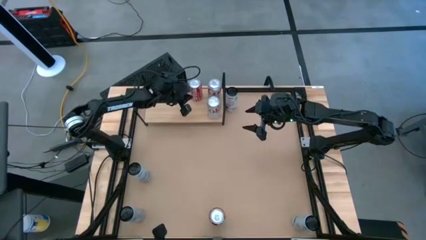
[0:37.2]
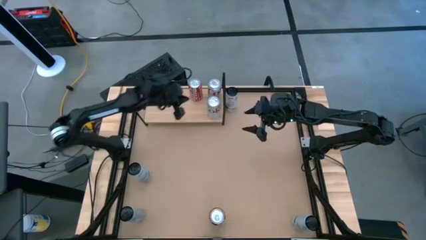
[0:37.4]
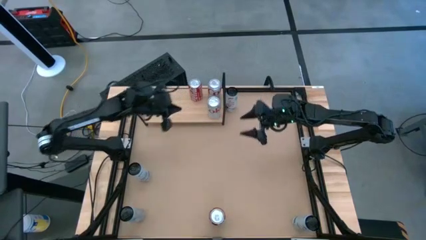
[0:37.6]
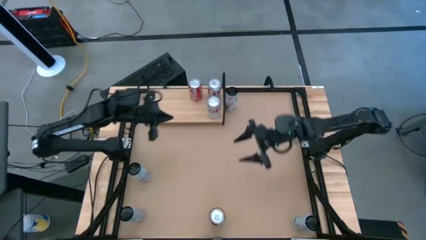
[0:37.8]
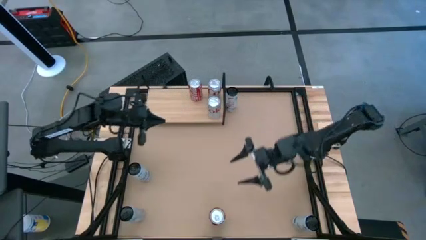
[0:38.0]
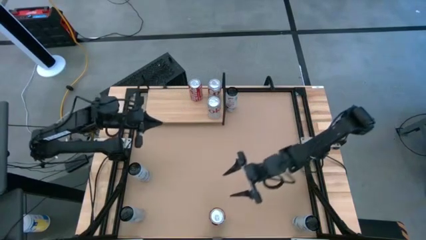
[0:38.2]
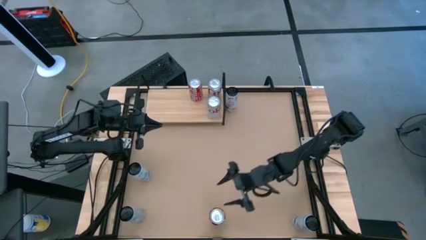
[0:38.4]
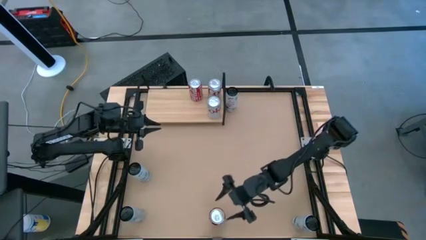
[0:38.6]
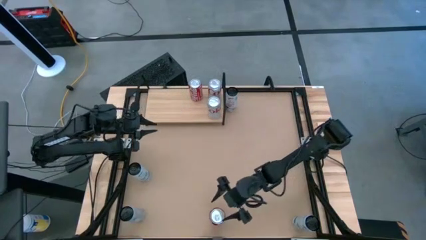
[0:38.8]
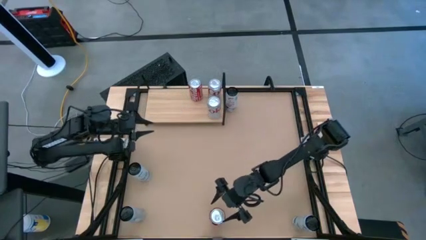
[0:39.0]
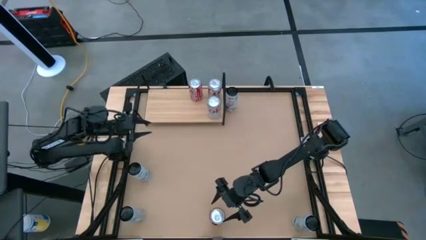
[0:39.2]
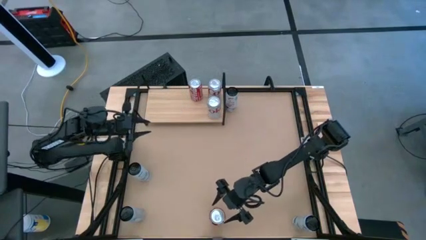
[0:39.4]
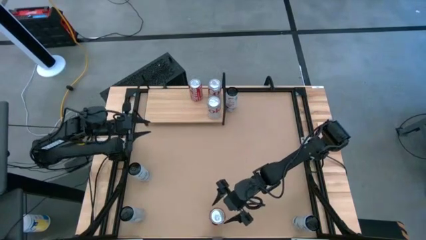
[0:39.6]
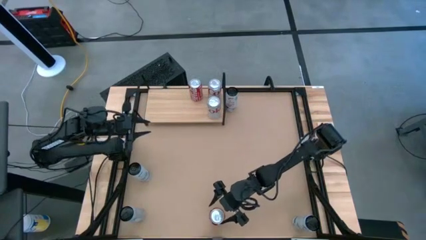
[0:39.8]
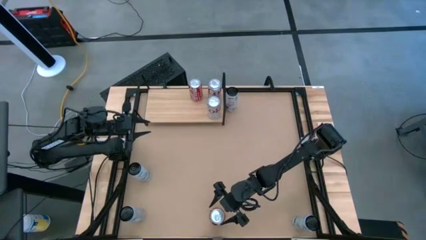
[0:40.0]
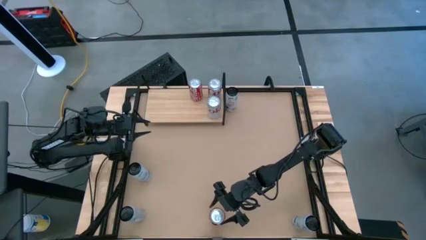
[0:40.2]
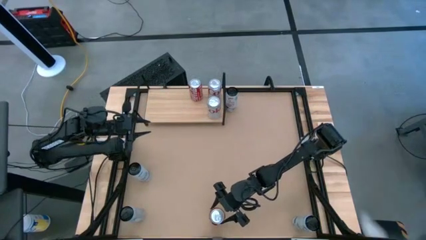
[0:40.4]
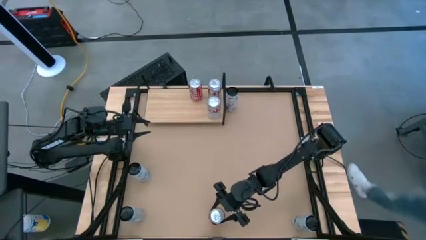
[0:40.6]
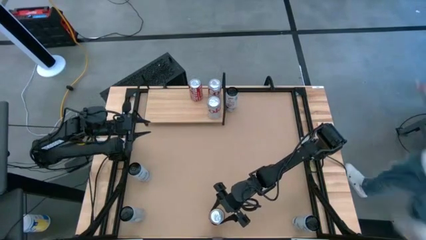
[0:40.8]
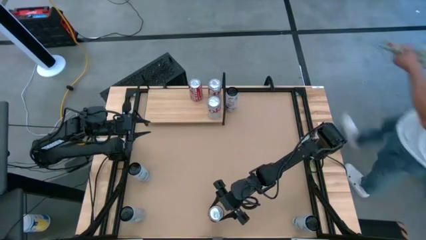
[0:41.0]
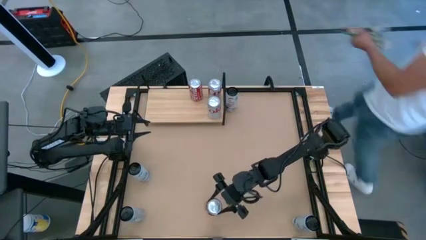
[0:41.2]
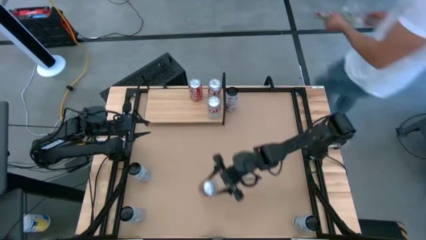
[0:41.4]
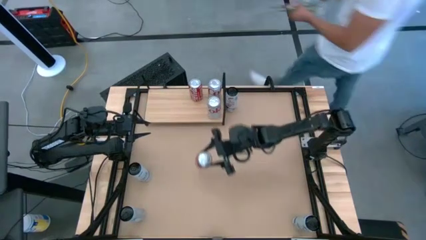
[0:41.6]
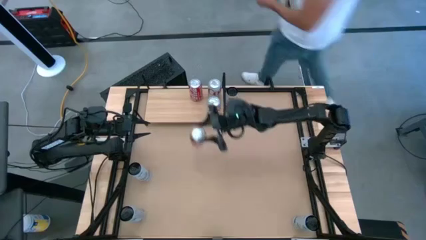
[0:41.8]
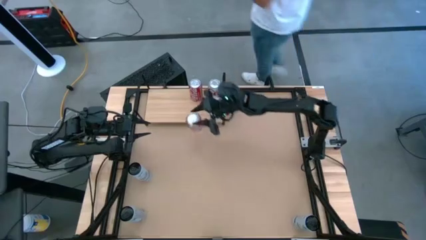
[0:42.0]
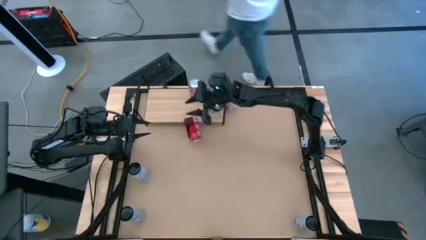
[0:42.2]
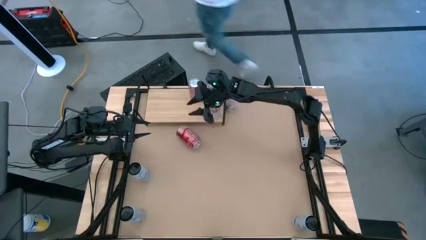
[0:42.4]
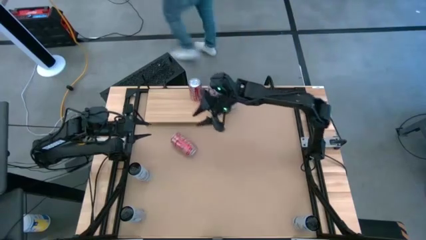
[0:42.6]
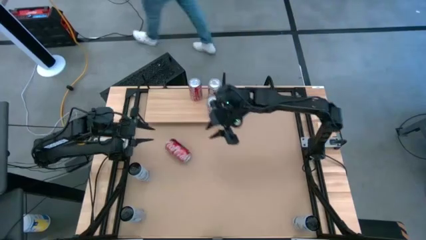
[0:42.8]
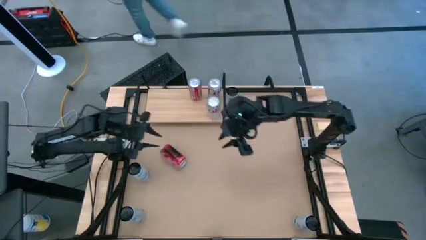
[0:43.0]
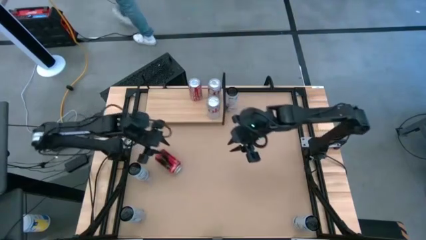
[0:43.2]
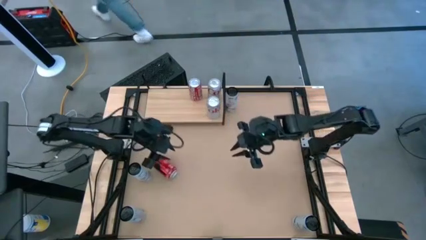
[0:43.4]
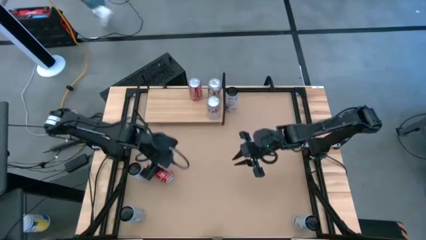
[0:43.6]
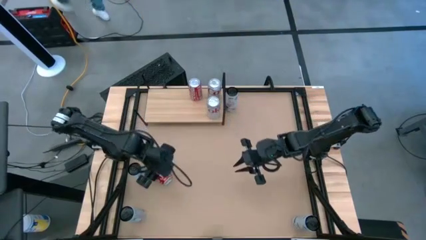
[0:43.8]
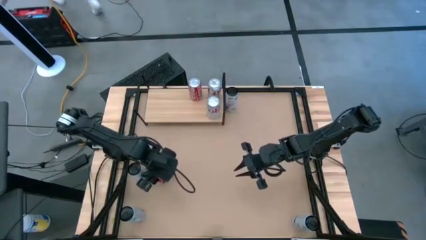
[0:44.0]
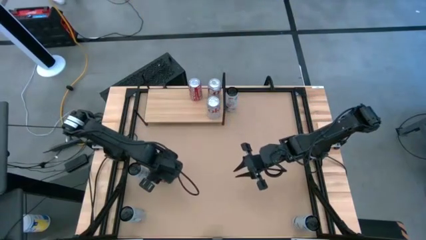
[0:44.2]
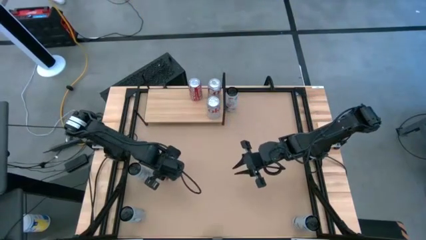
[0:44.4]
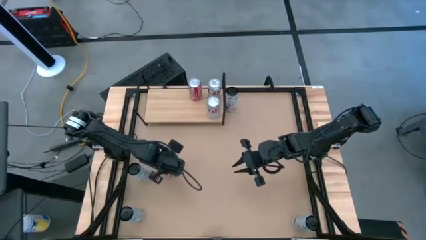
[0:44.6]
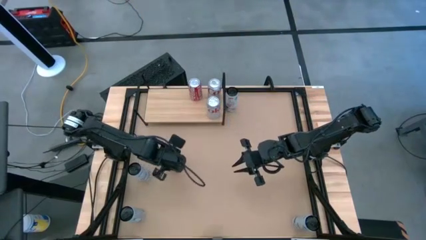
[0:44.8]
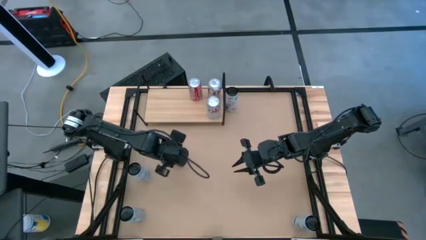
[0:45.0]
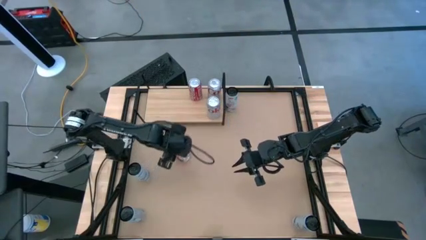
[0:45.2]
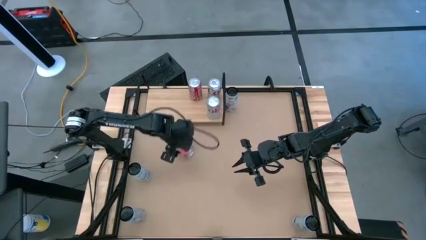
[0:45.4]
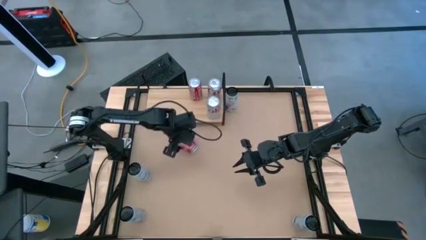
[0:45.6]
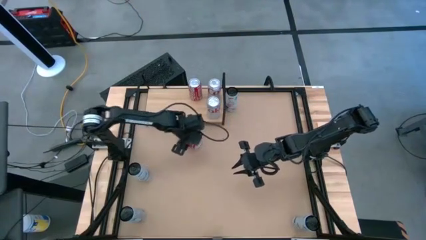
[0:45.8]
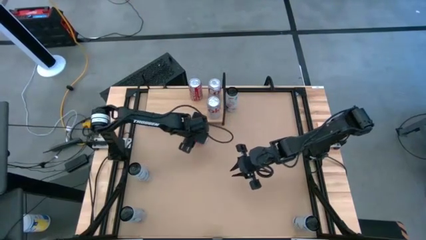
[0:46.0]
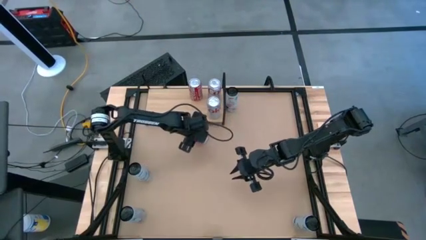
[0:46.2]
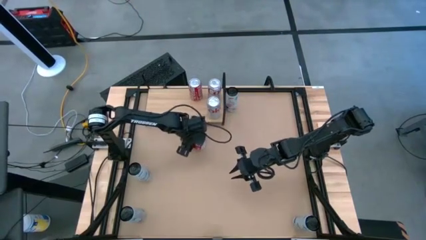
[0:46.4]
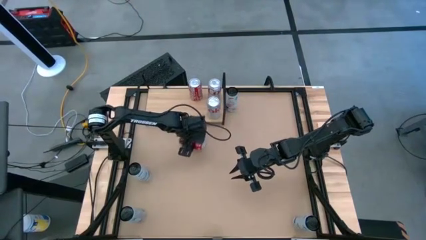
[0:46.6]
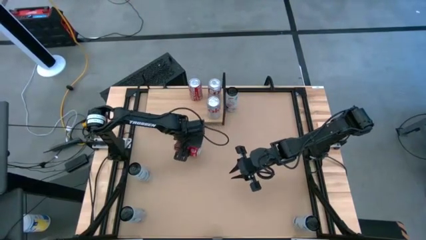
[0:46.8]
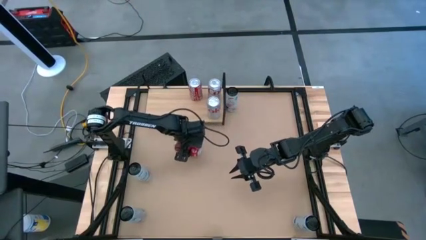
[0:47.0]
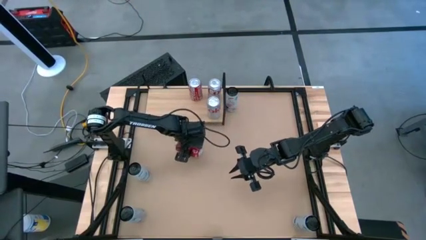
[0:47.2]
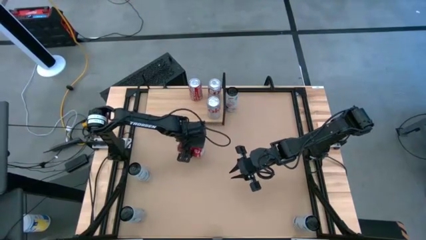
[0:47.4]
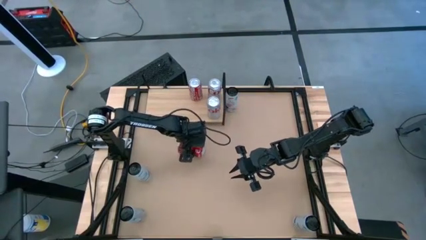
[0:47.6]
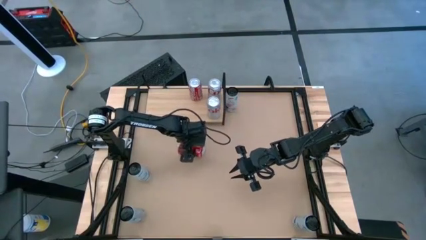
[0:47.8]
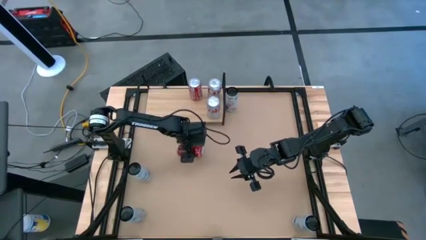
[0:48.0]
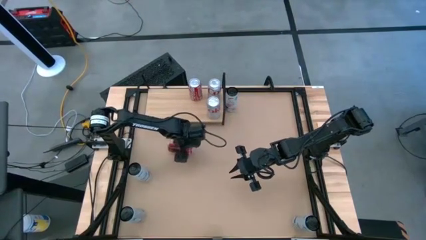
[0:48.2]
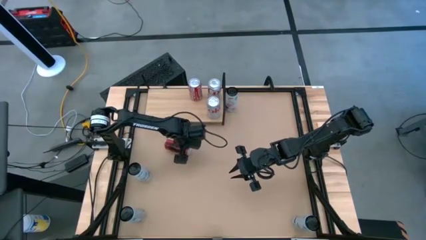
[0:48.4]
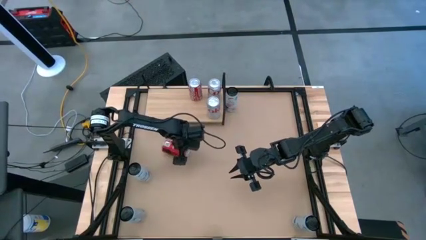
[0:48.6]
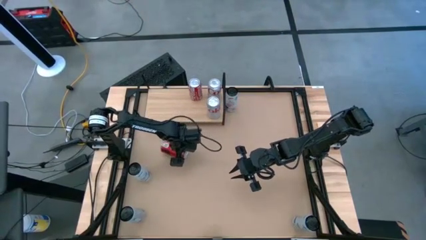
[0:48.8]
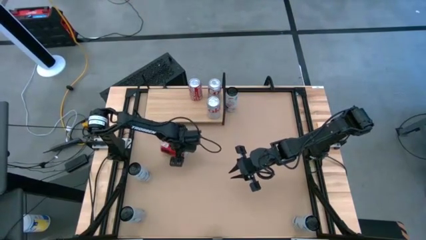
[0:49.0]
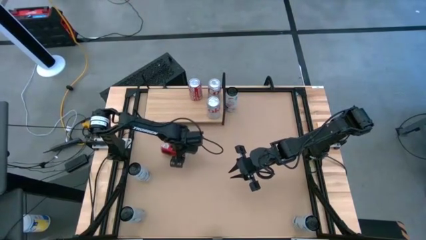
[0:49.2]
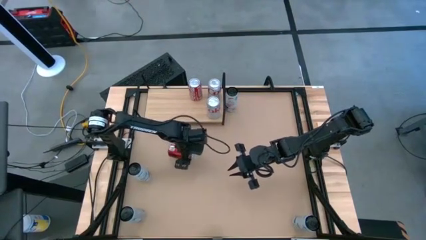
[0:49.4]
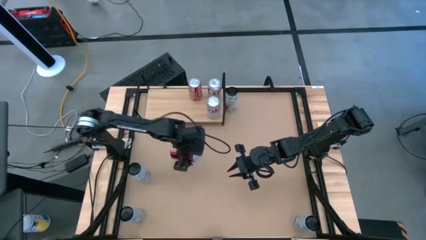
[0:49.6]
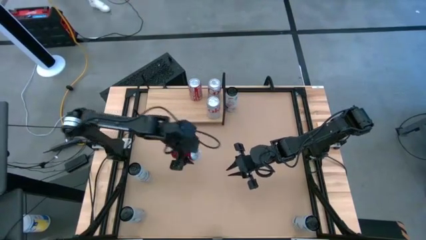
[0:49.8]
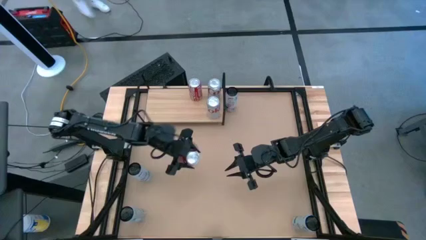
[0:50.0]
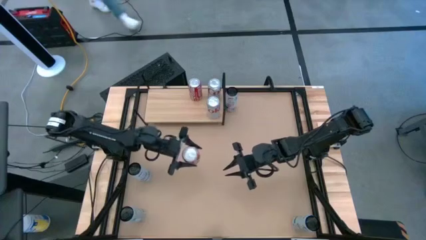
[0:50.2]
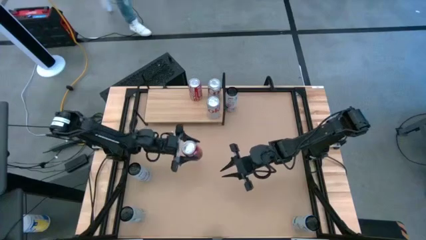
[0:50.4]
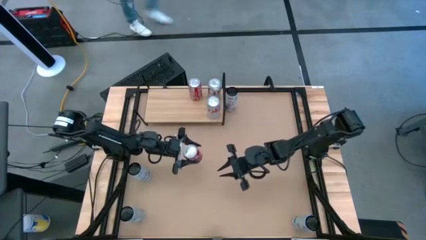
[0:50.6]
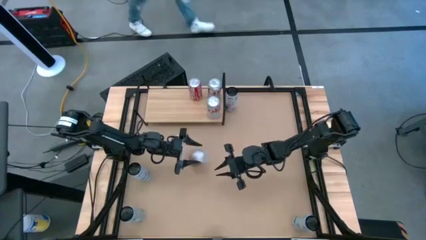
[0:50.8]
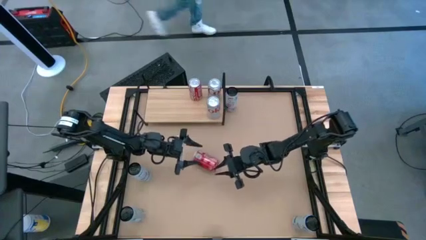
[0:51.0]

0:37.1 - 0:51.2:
Task: Place canned beverage on shelf
Put the red and white soda can on the shelf aligned with the other red and white soda can

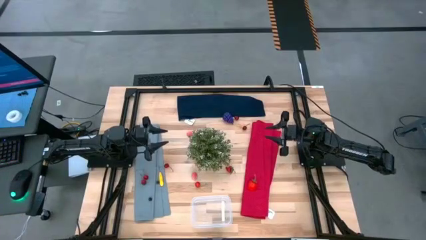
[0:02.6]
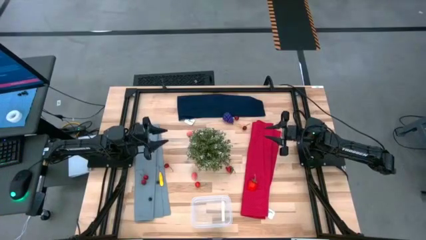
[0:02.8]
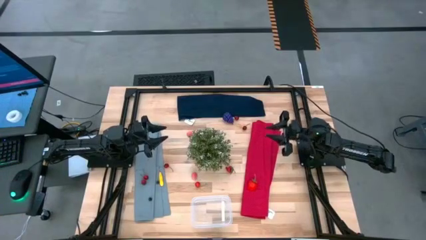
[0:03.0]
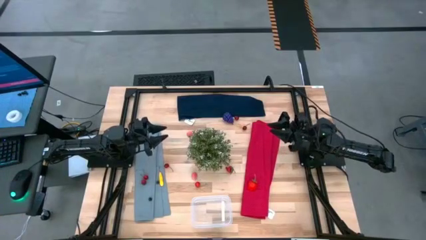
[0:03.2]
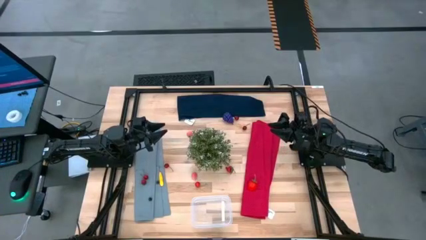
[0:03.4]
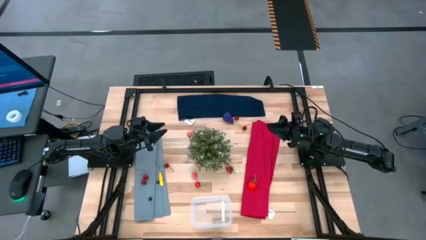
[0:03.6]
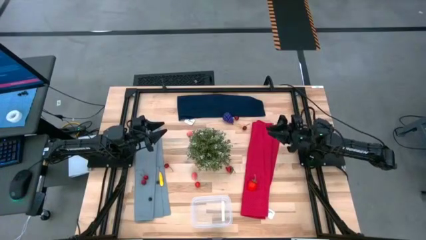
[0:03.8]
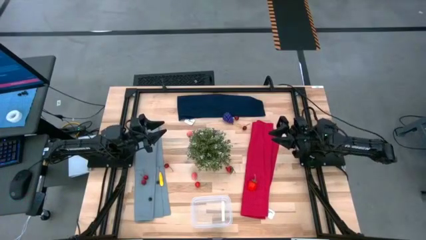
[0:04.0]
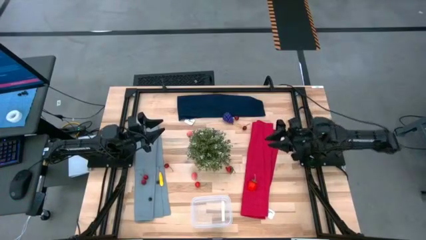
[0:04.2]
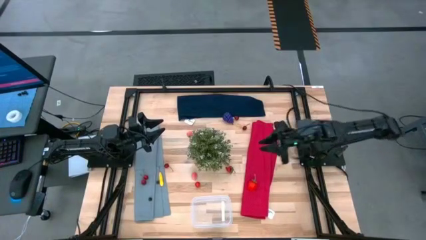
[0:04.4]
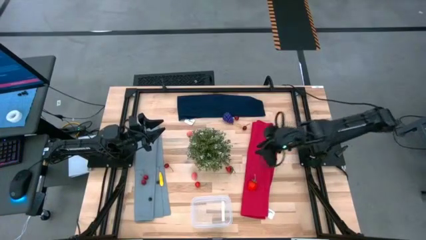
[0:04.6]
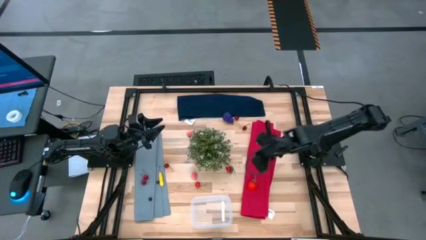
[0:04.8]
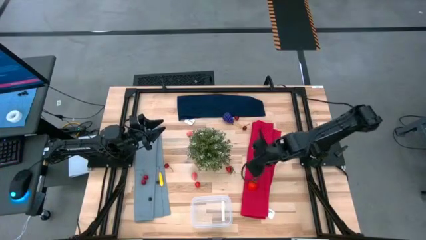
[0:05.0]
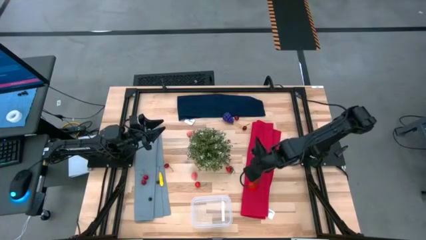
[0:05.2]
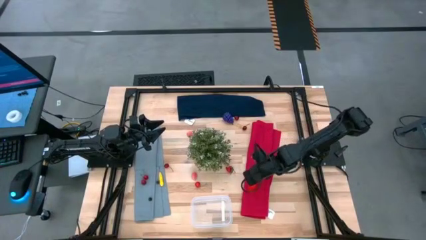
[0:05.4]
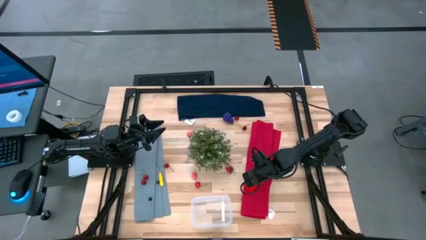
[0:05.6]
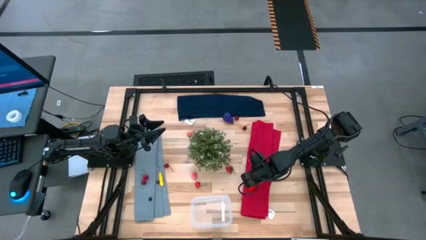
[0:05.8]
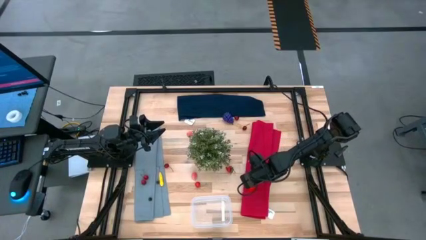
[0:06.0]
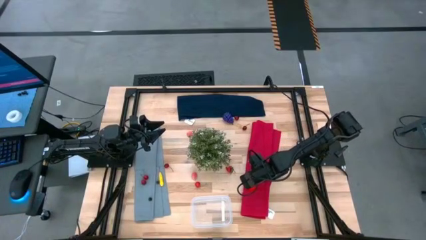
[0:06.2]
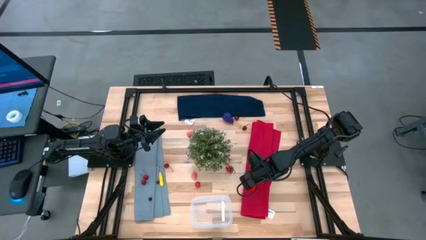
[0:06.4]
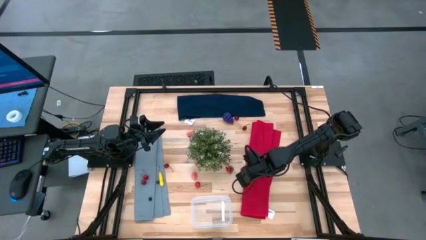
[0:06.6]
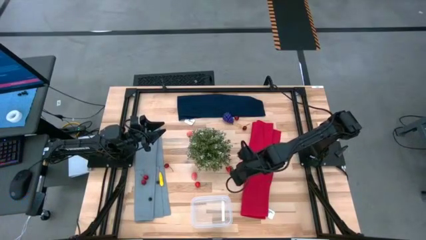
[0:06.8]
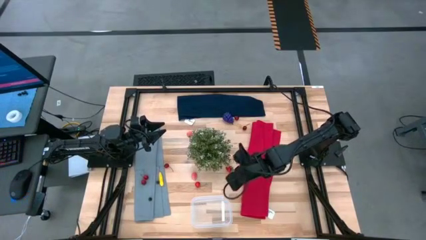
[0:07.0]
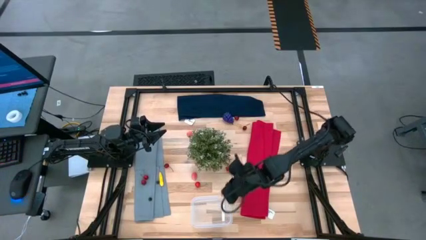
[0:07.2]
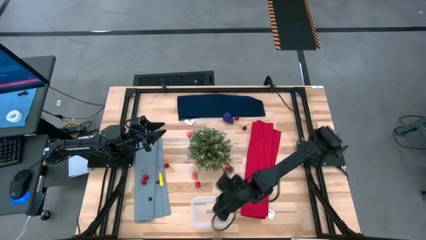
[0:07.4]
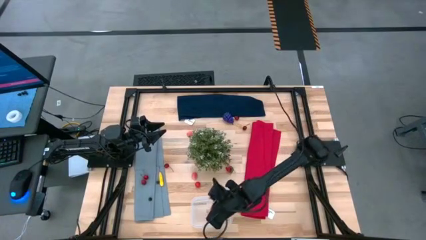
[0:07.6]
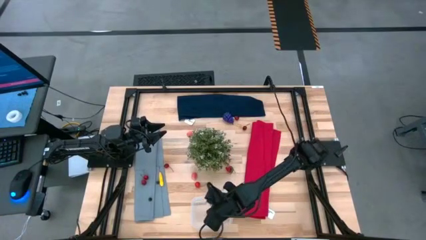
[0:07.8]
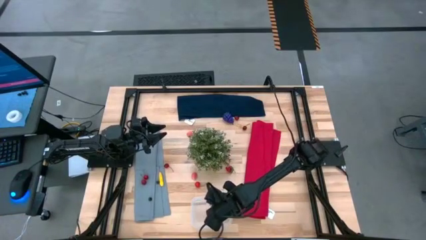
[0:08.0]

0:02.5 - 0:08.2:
Task: Pick and placing Produce into tupperware
Put the right strawberry into the transparent container
